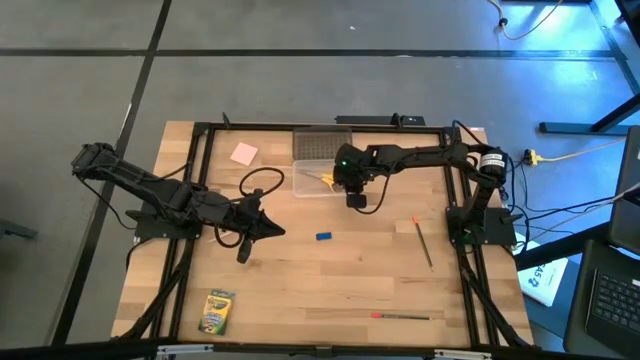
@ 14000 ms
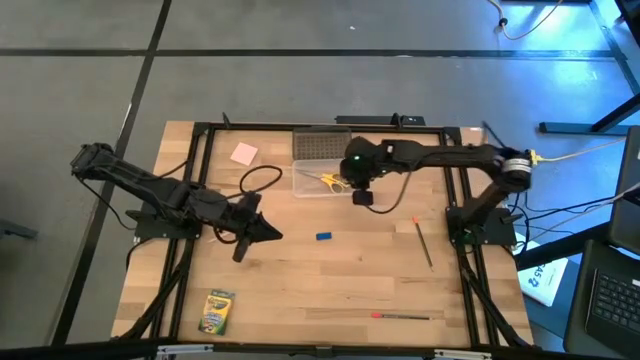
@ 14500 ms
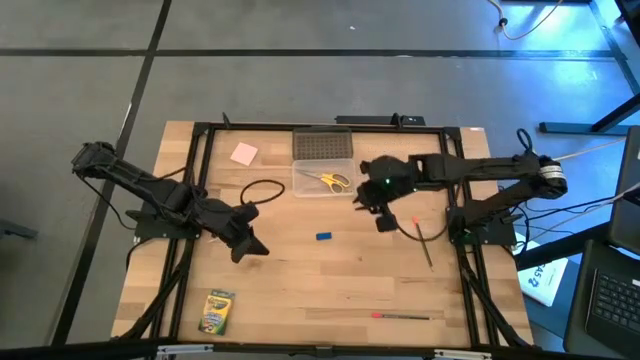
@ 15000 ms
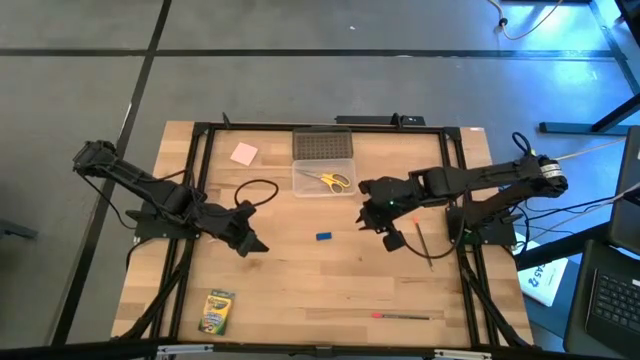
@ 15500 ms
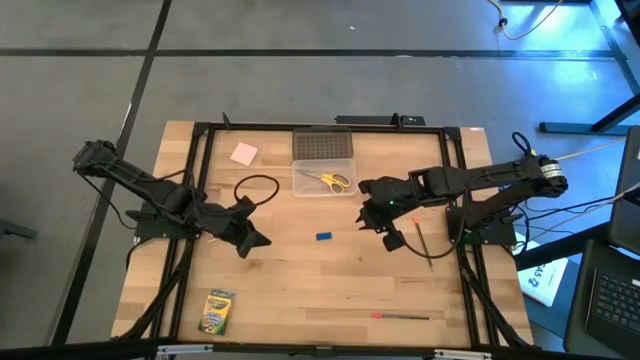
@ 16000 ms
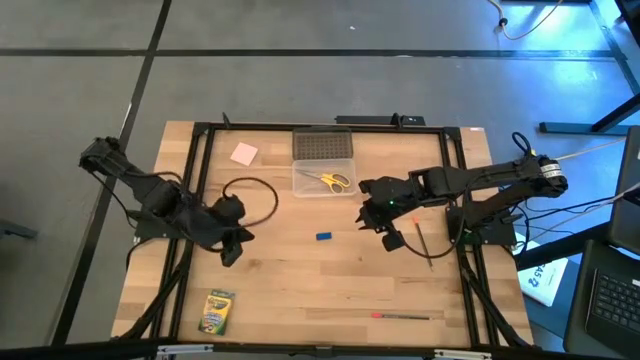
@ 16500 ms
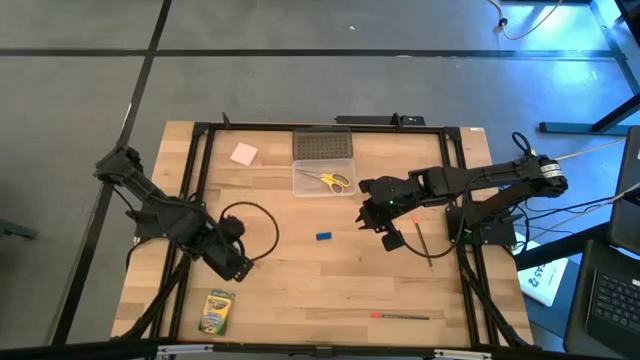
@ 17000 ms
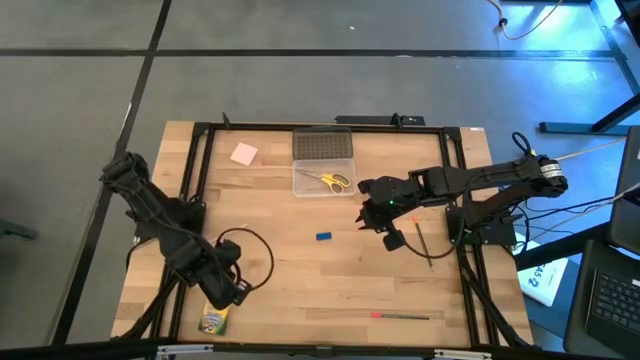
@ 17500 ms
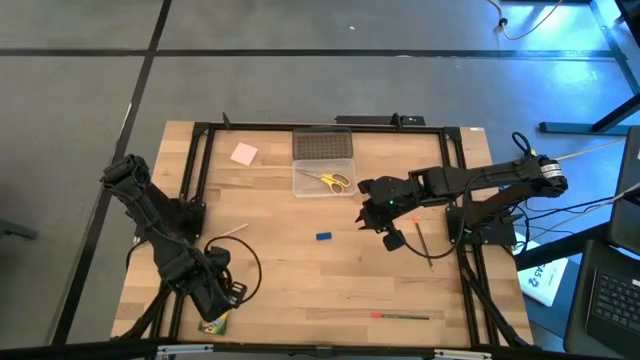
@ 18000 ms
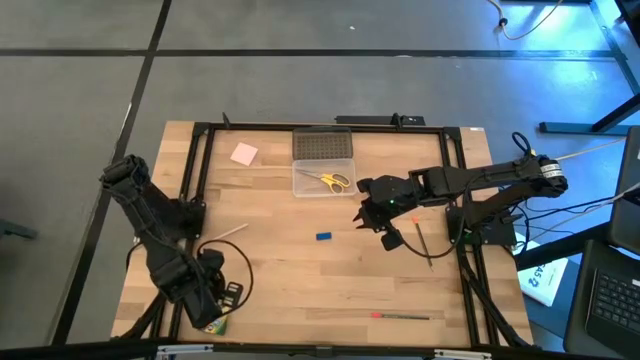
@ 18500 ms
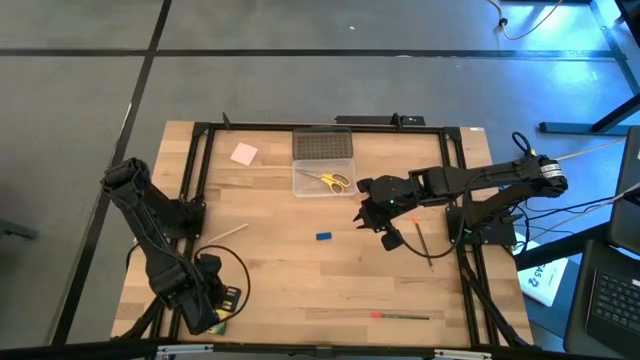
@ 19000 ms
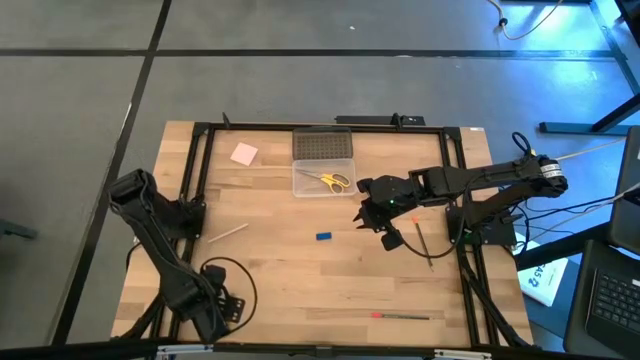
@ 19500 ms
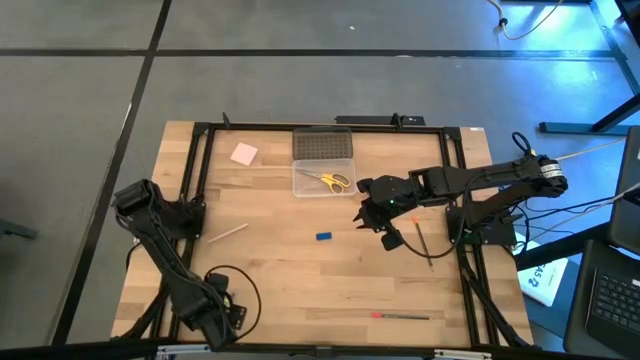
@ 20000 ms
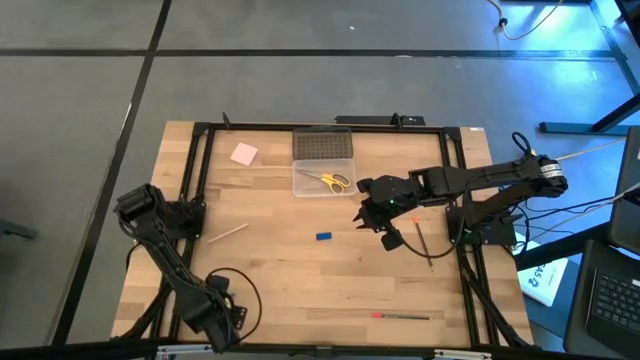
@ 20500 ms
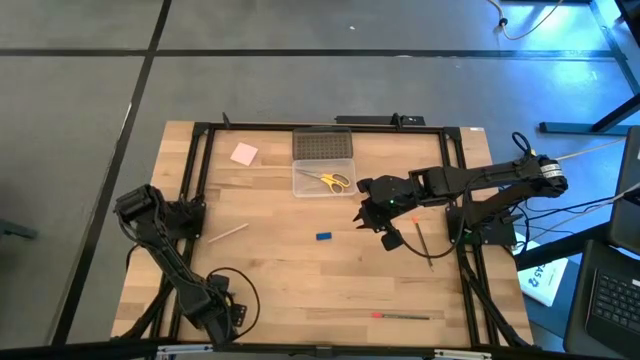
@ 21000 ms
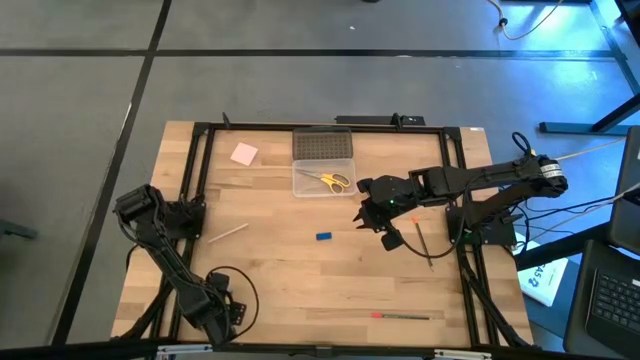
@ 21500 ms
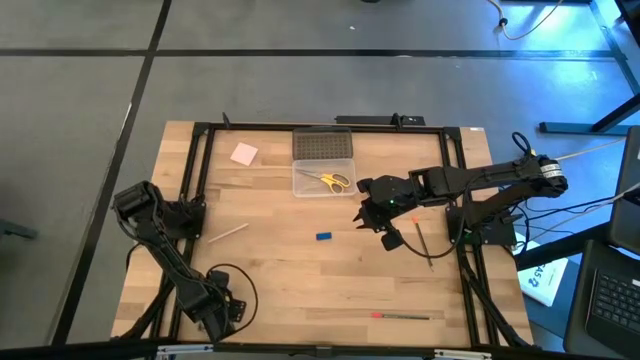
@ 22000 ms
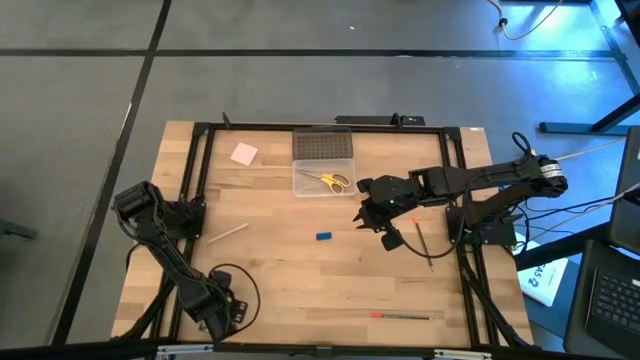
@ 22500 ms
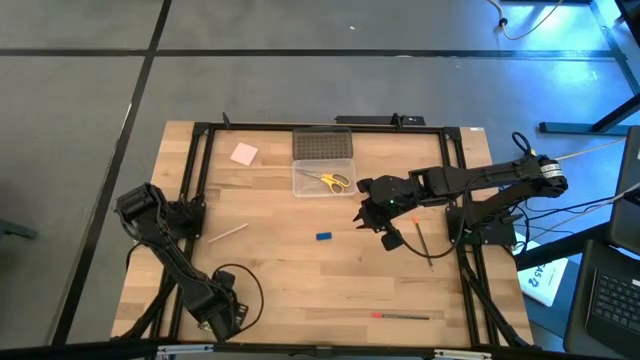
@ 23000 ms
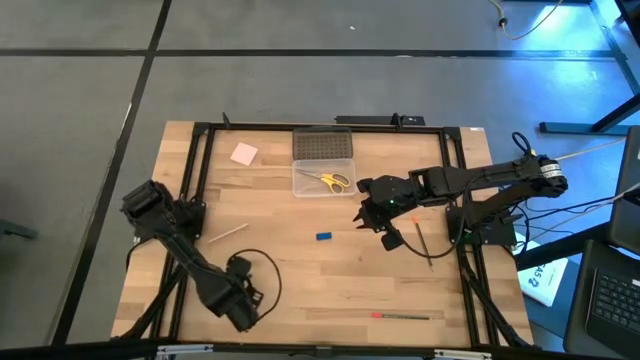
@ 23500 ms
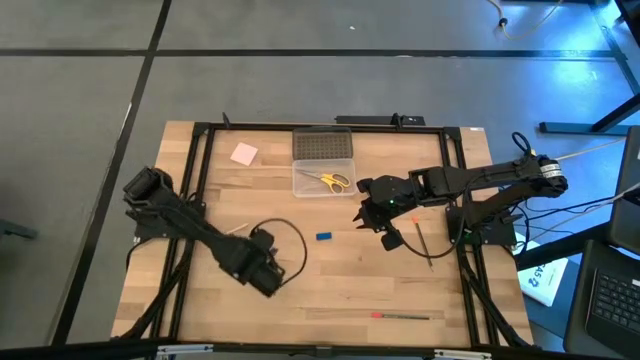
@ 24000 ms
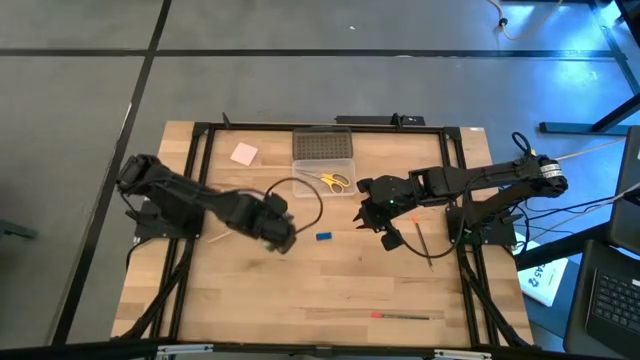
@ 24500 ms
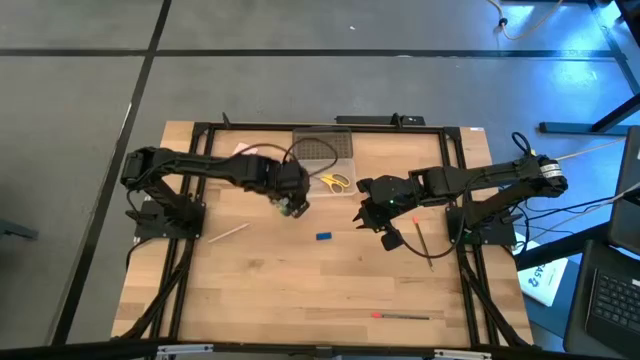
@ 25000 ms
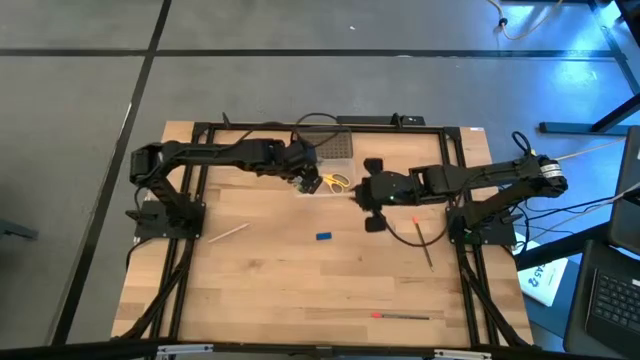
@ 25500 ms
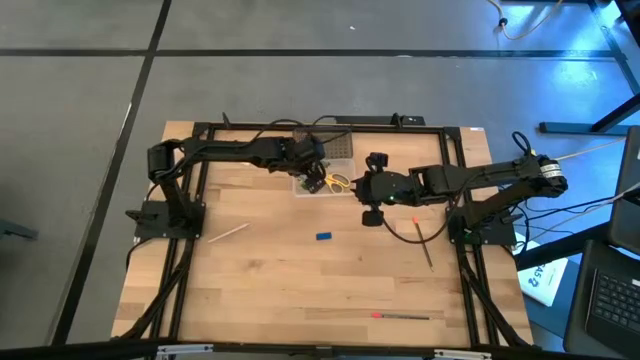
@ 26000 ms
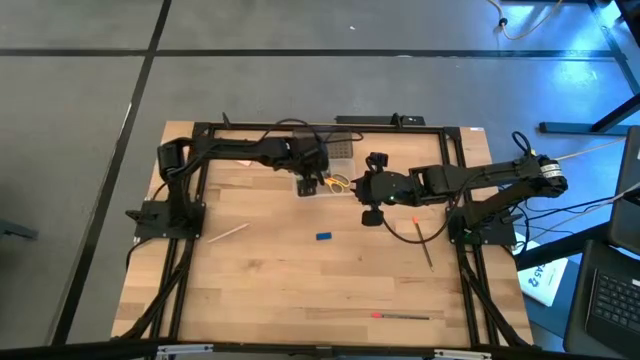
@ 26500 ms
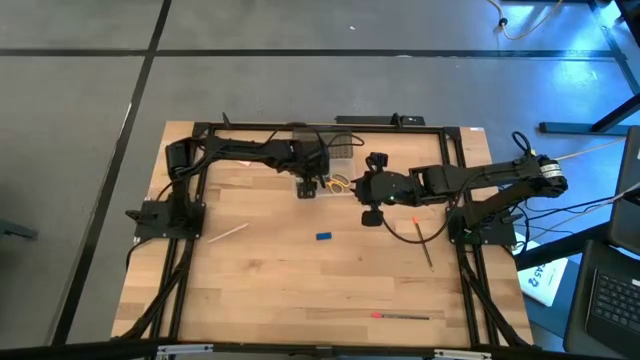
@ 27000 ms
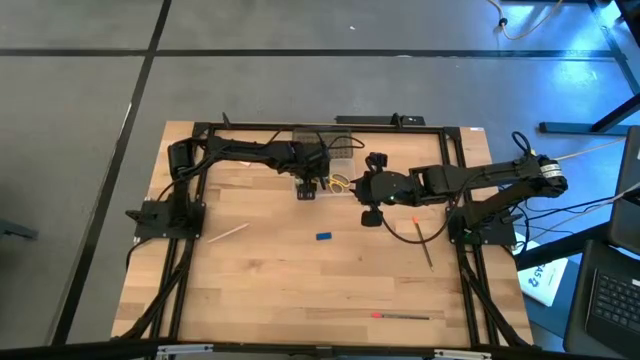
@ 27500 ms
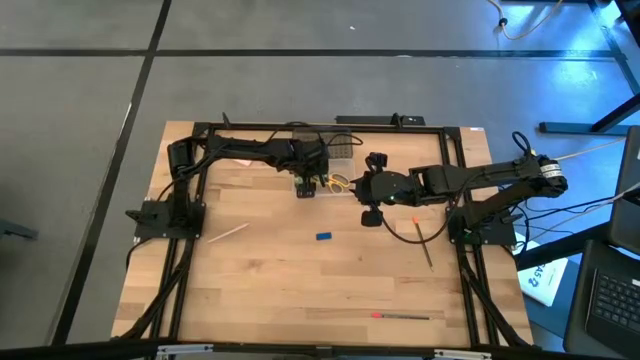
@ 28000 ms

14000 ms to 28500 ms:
Task: Pack school essentials
Put the crayon box into the black supply box

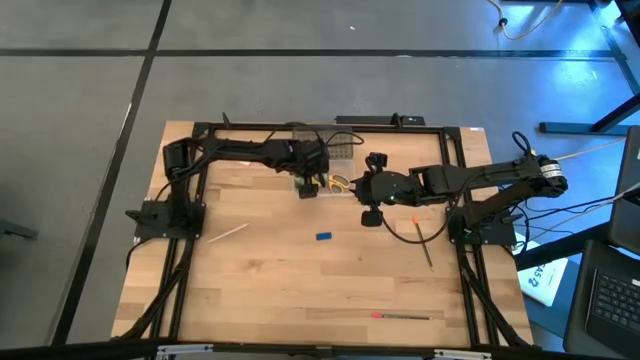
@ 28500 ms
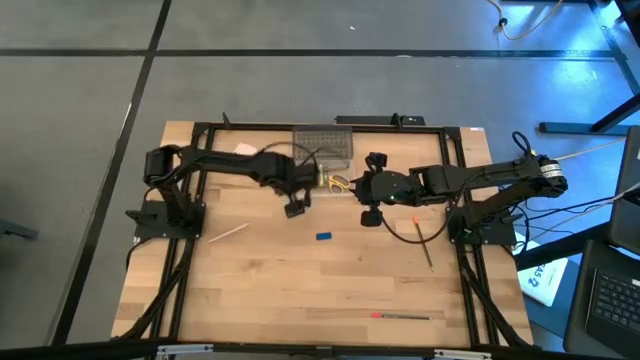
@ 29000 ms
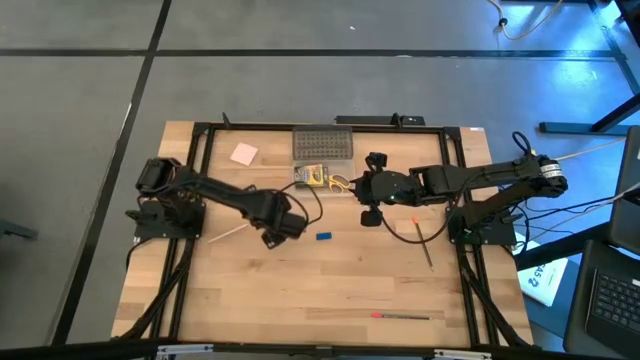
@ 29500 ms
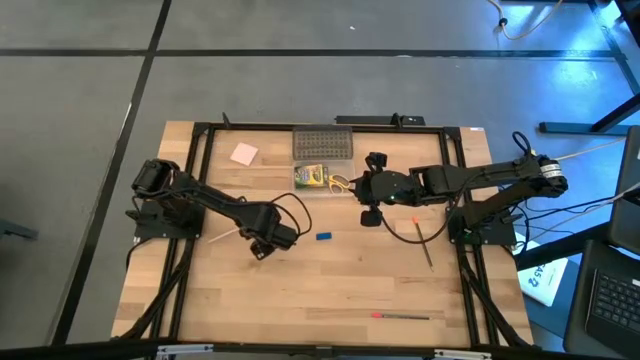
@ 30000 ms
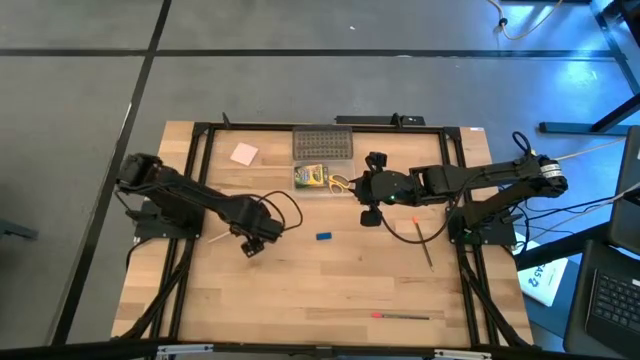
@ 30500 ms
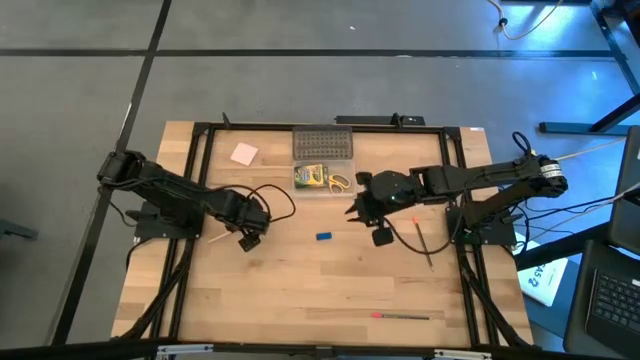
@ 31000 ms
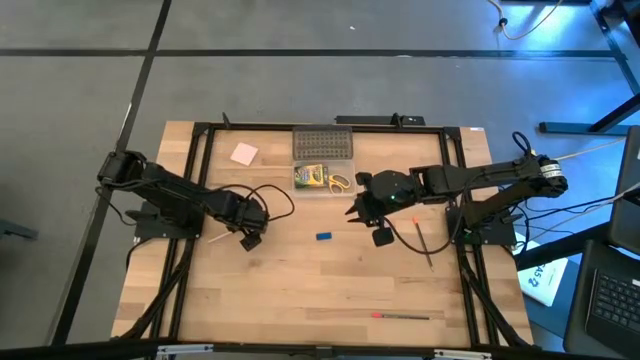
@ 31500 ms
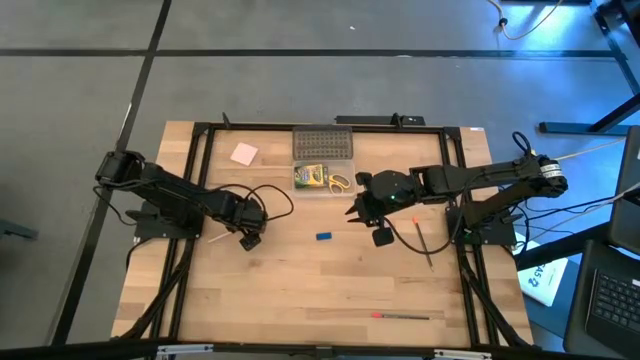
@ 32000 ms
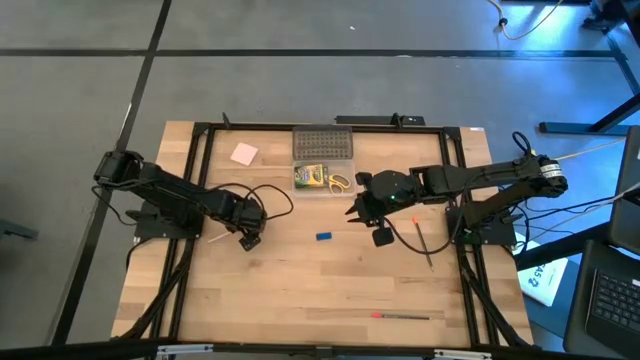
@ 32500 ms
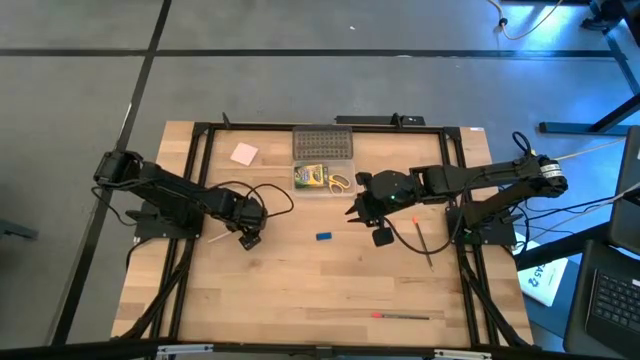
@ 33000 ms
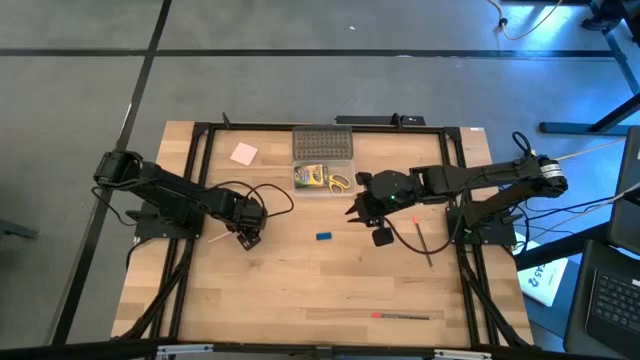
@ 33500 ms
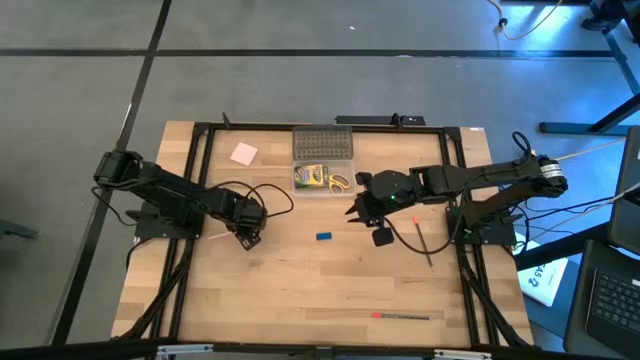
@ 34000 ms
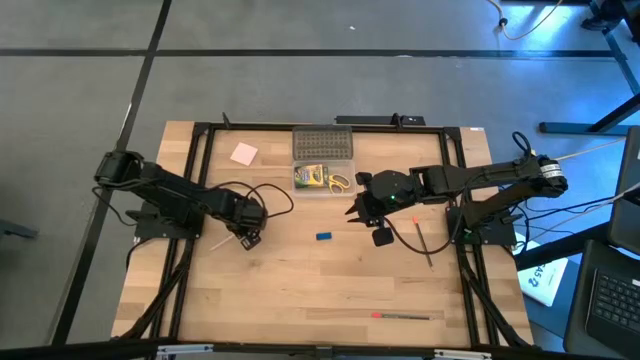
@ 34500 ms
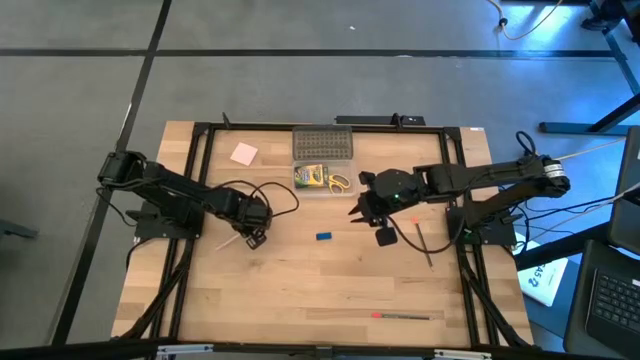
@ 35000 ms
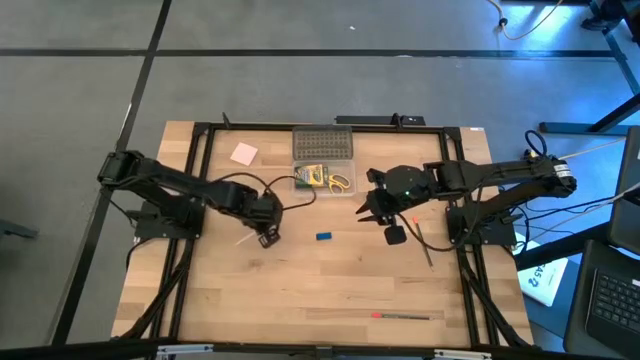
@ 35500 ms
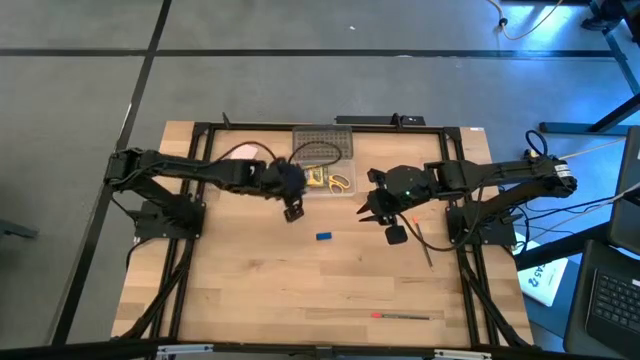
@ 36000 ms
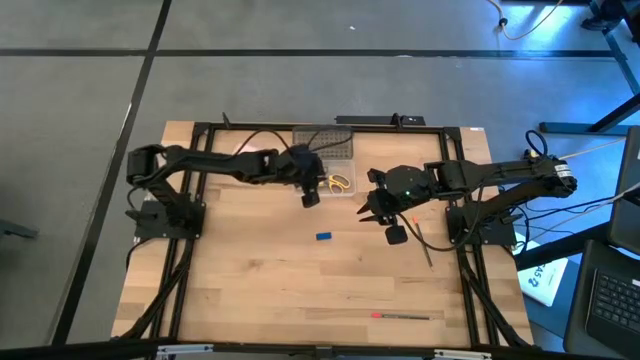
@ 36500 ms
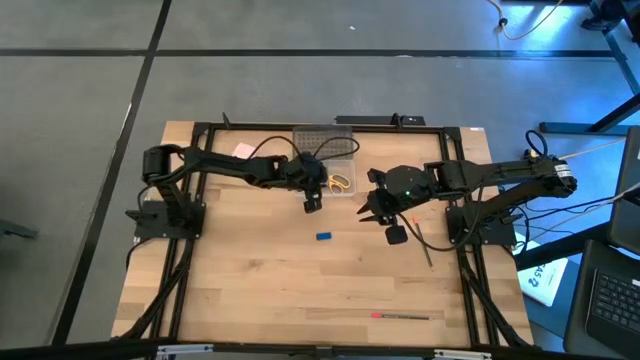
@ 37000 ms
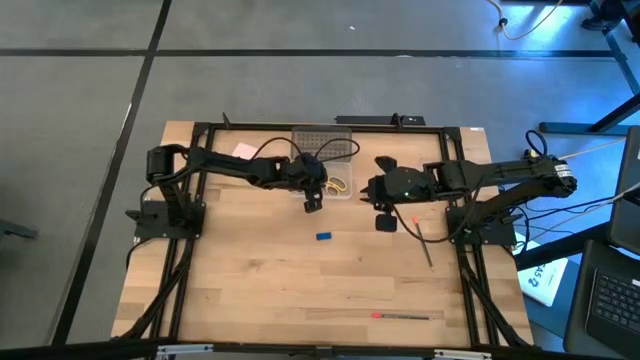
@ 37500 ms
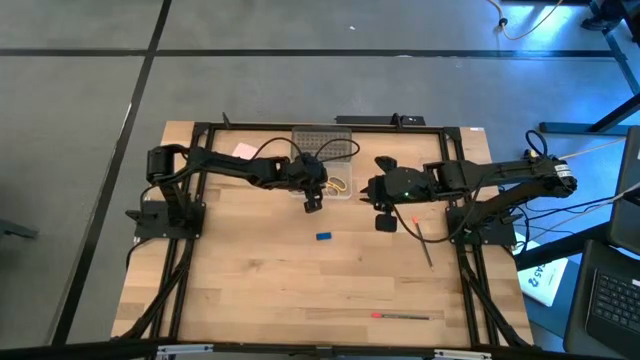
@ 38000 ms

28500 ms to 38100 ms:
Put the light pink pen into the black supply box
